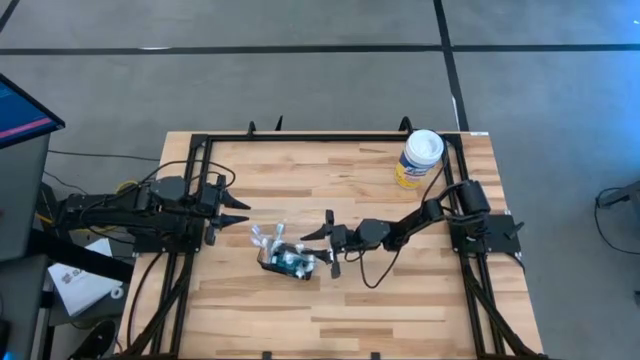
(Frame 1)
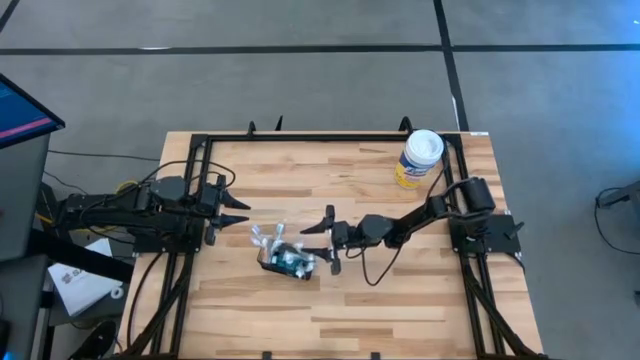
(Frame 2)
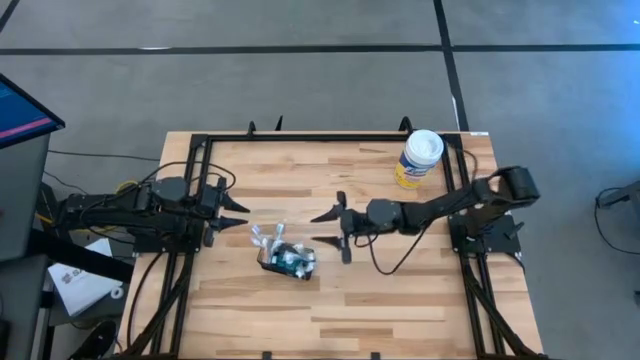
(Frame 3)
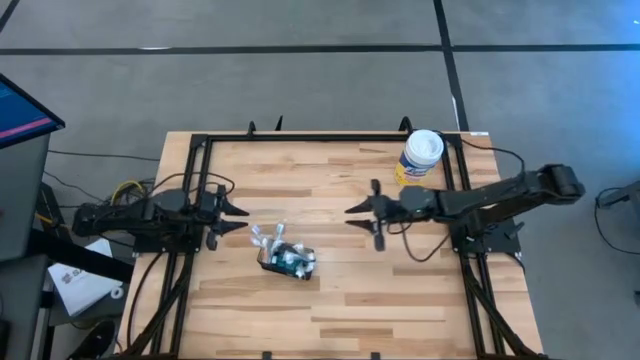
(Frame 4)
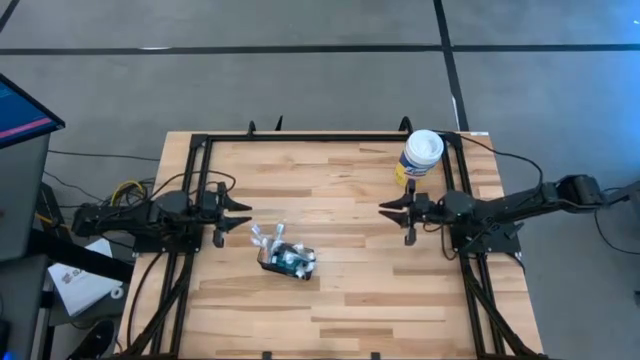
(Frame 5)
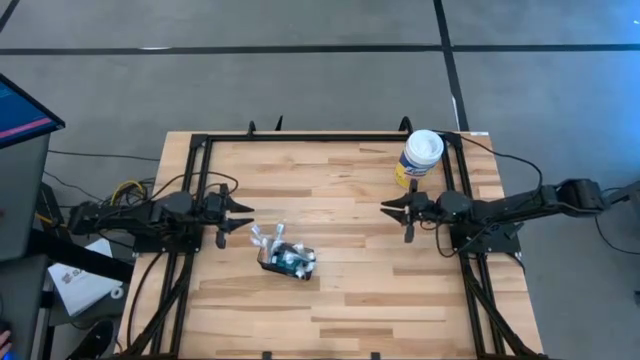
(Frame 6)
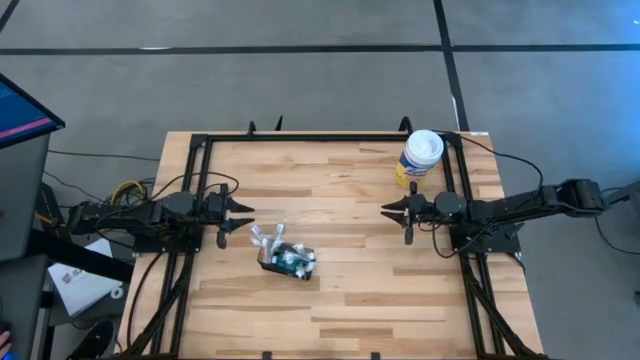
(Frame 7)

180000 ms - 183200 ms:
Task: Pick & Place toothbrushing station
Return to Home Position

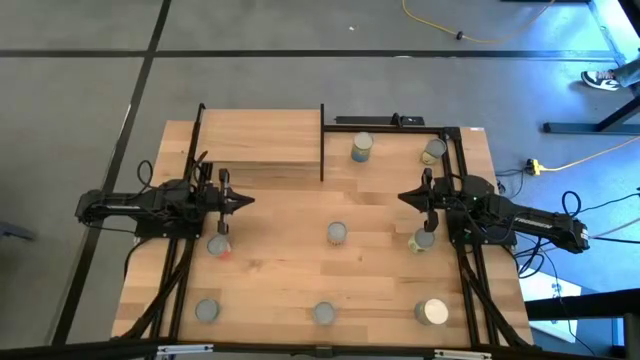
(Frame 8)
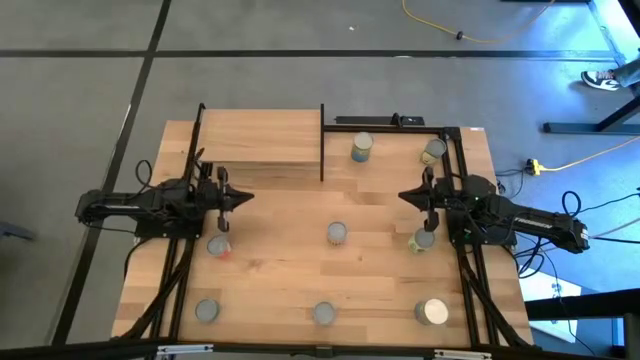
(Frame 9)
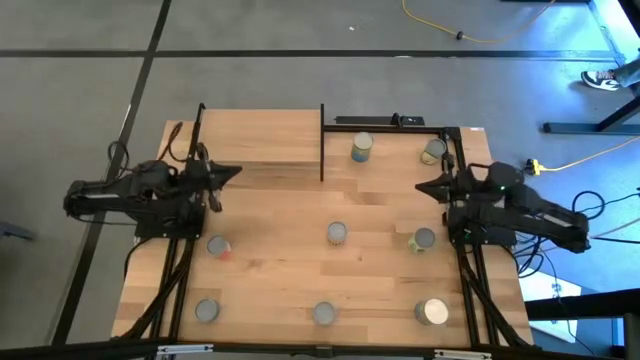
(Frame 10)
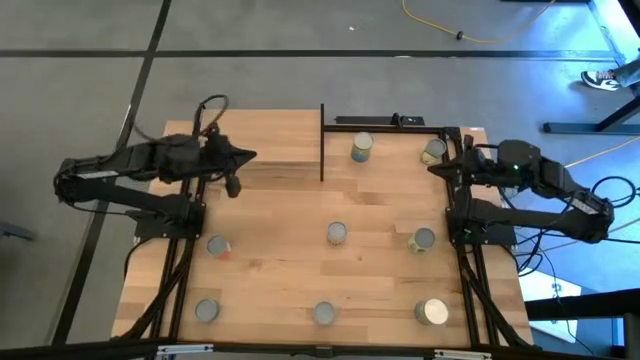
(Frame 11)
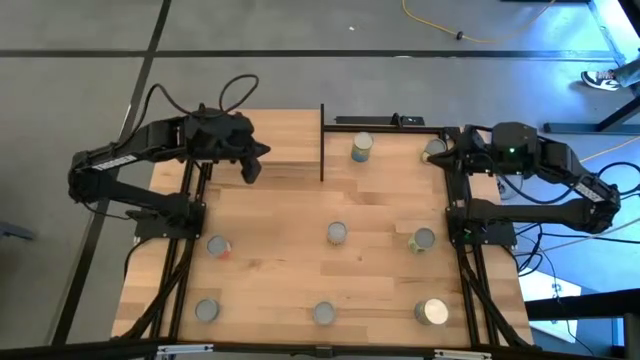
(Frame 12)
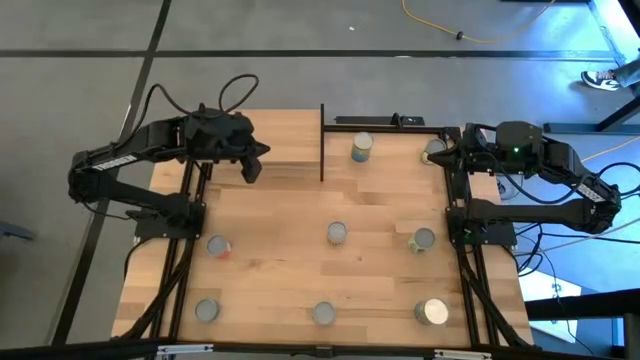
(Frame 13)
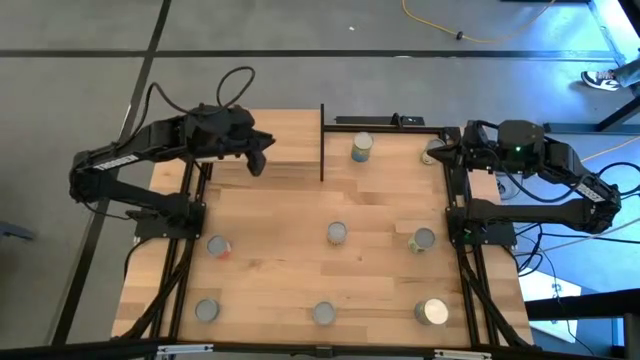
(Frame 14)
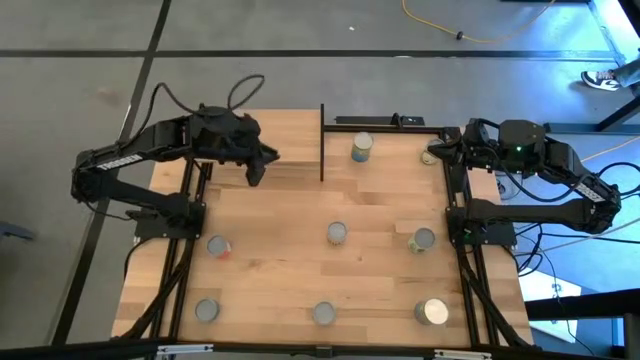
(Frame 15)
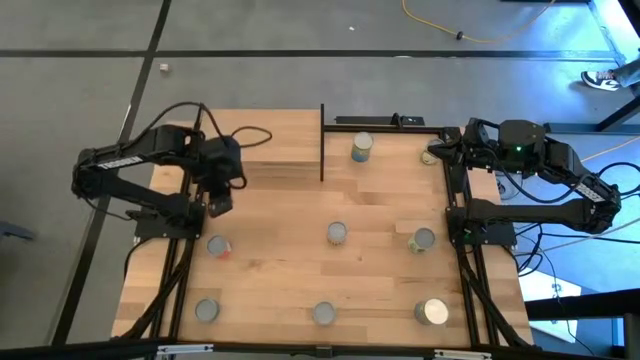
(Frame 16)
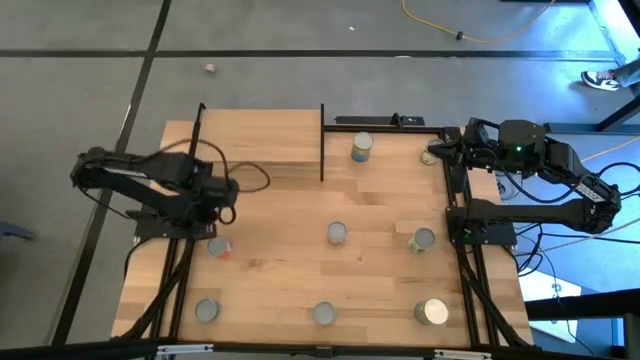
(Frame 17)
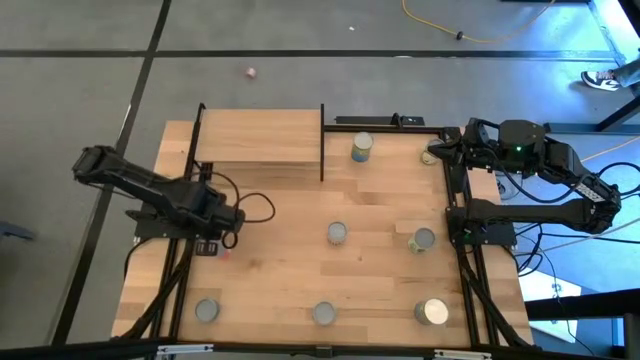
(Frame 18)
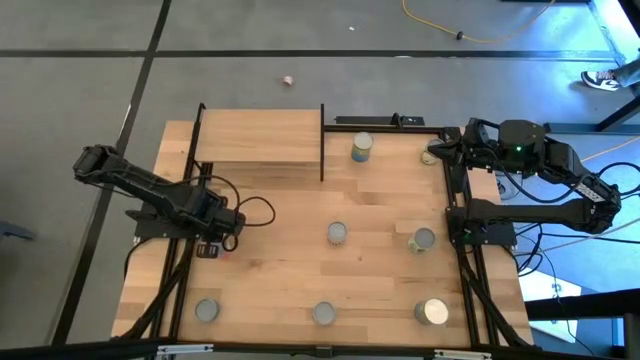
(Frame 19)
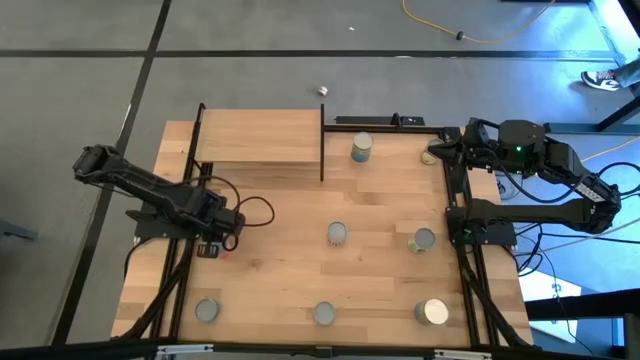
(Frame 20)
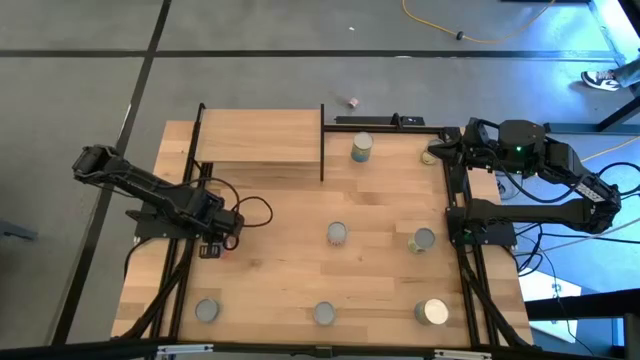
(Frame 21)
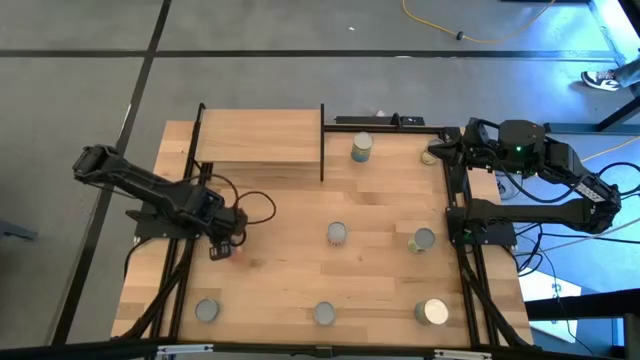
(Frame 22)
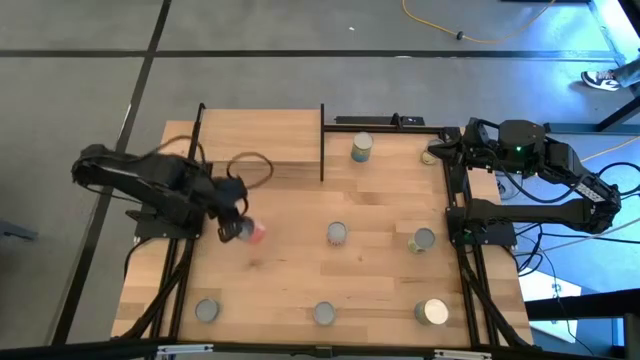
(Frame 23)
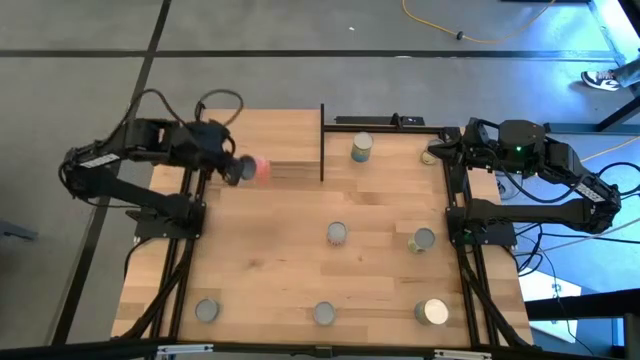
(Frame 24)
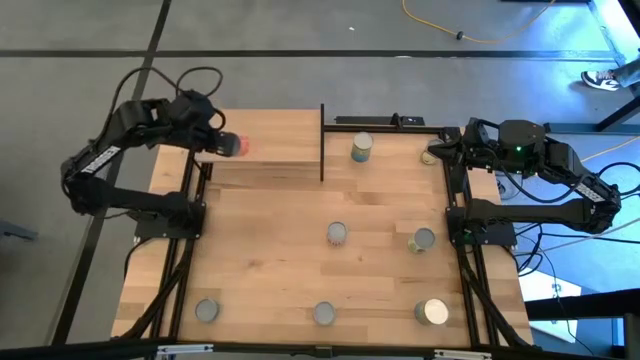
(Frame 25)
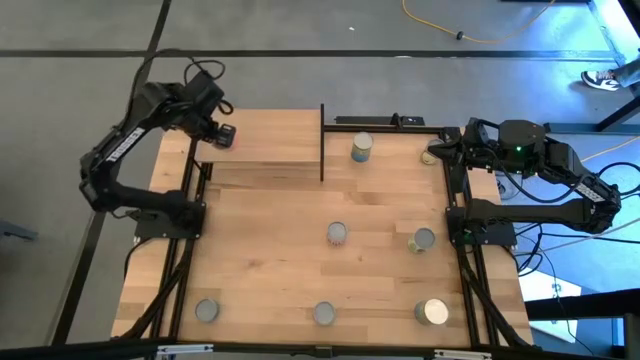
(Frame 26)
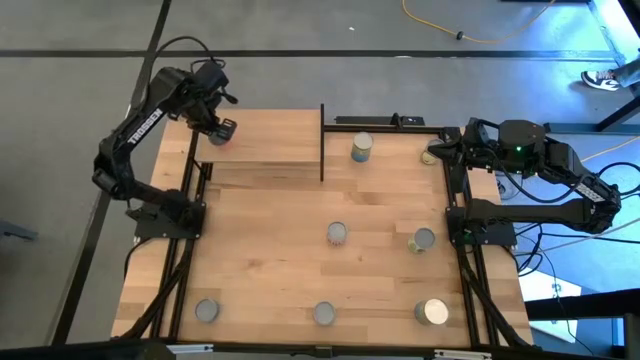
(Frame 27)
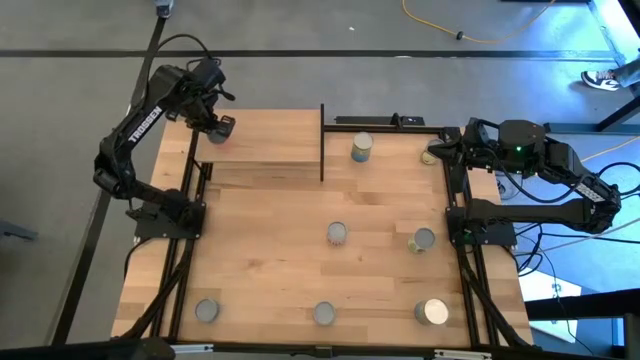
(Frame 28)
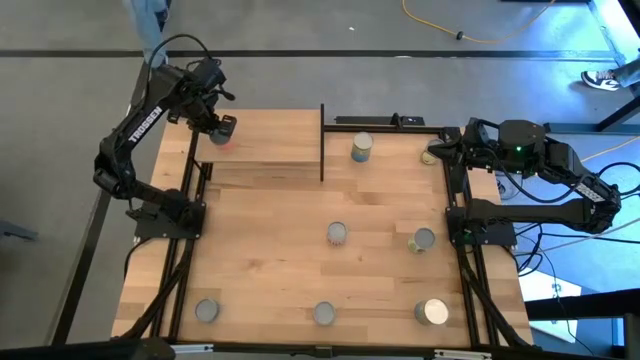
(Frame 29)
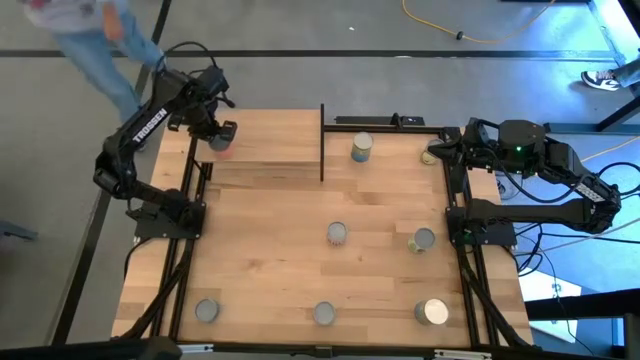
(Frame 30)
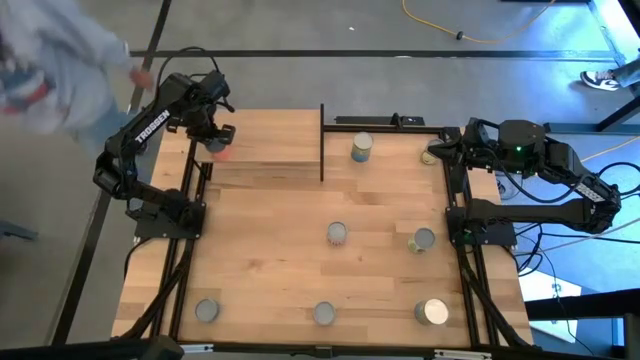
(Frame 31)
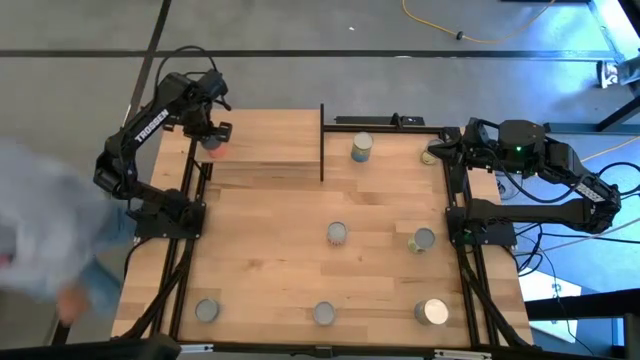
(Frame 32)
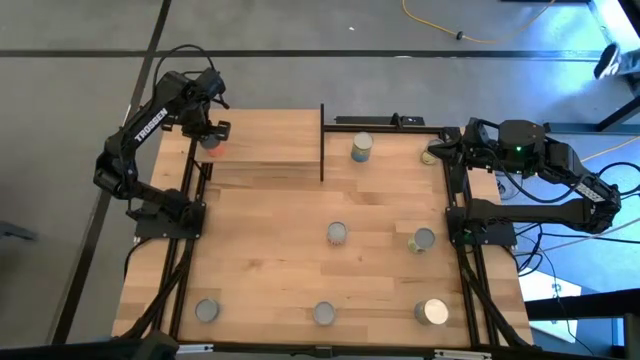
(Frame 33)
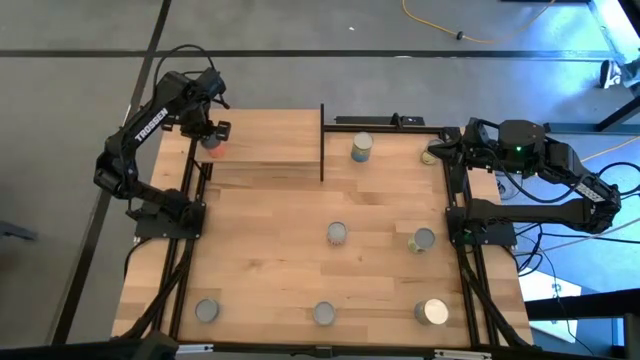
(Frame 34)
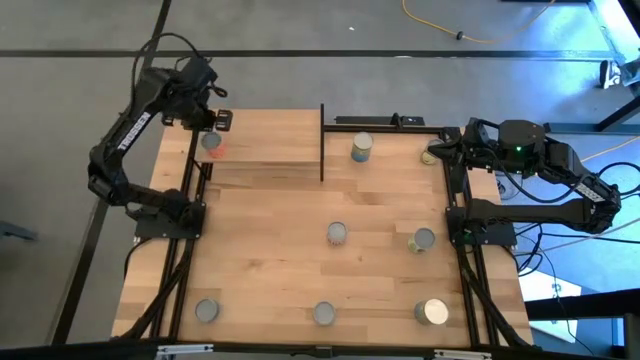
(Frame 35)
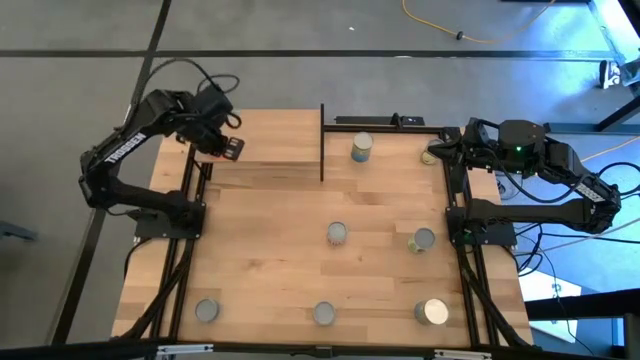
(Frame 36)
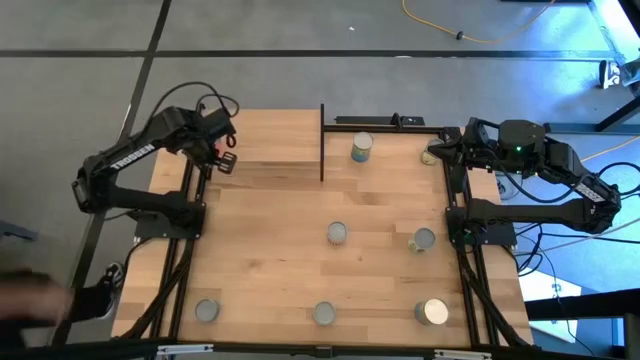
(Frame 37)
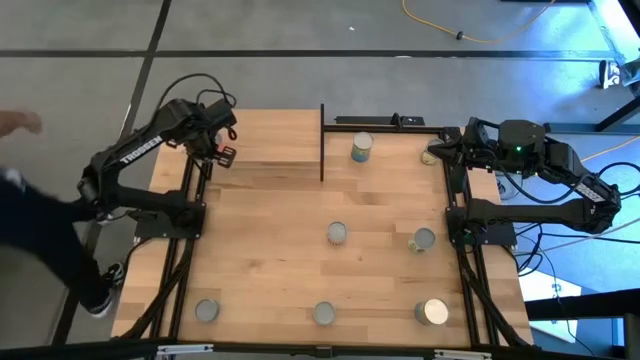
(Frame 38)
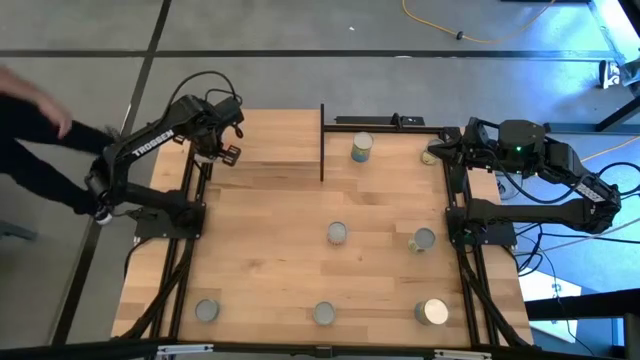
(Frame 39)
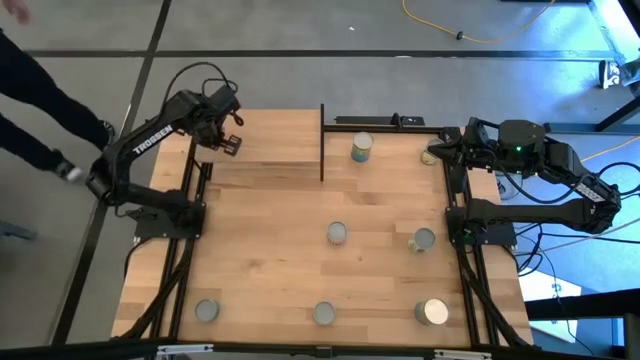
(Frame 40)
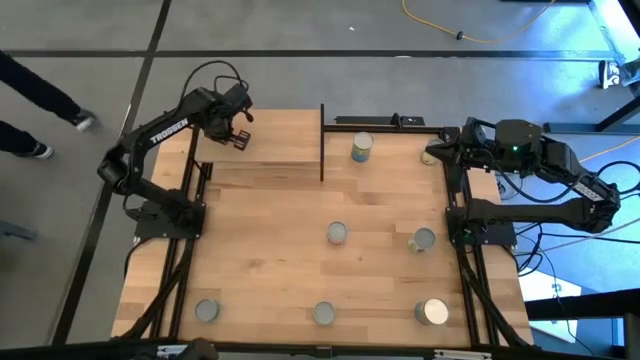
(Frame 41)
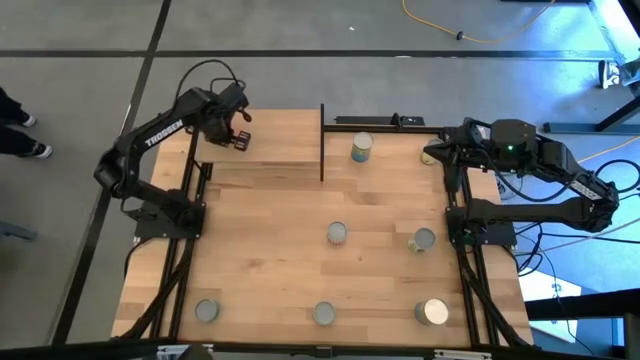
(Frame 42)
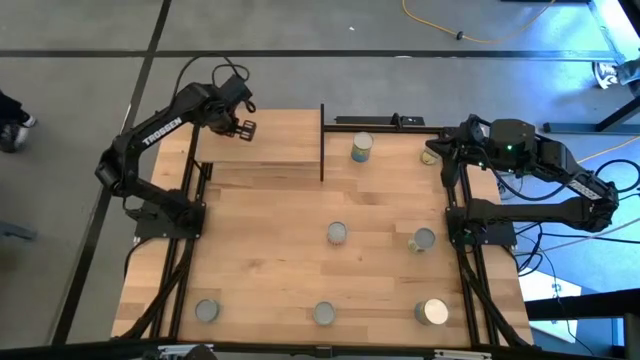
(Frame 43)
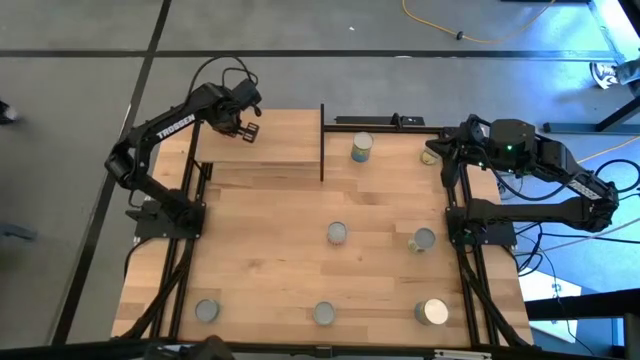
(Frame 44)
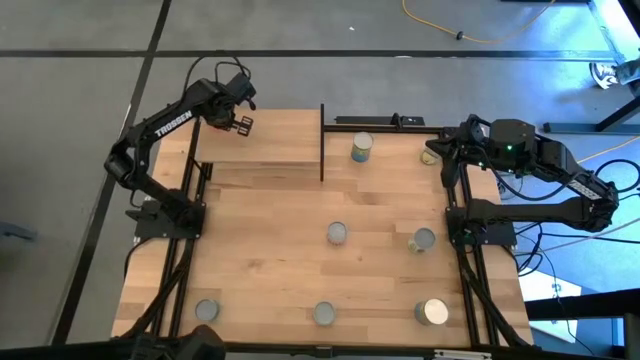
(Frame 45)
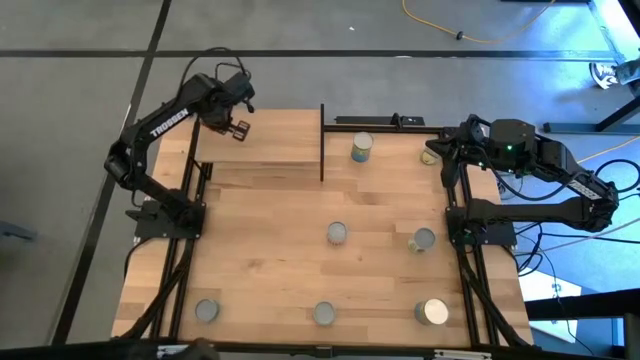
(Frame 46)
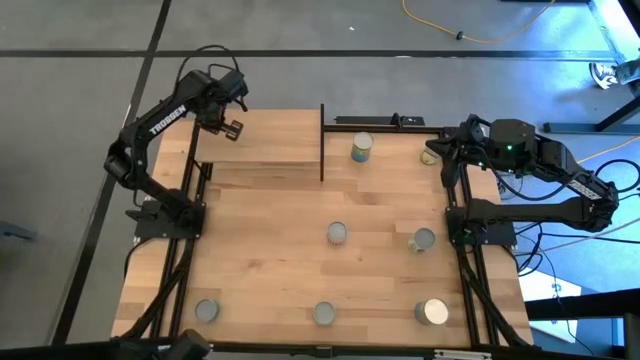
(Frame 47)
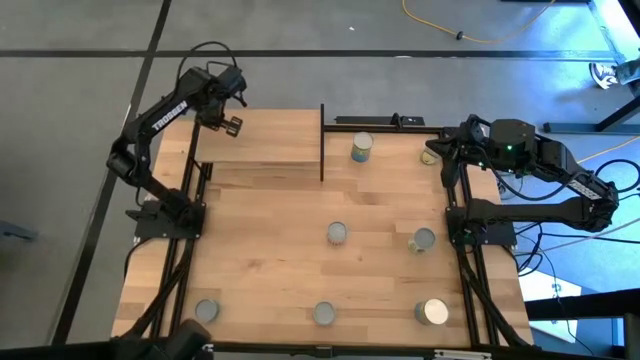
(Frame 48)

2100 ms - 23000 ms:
Task: Pick and place cans onto a shelf
Put the canned meatballs on the shelf
